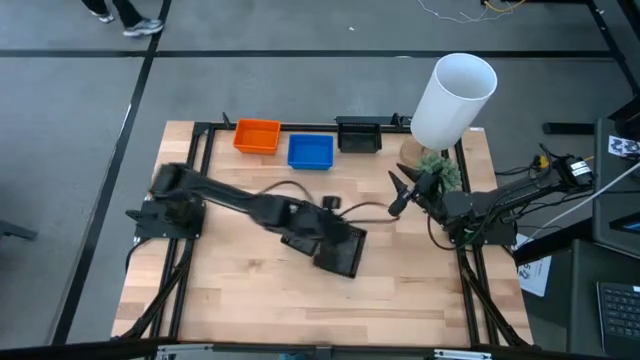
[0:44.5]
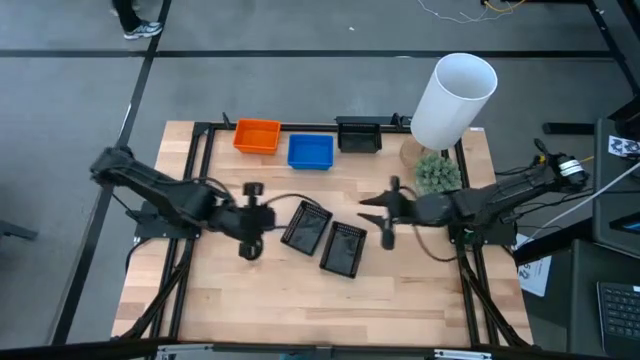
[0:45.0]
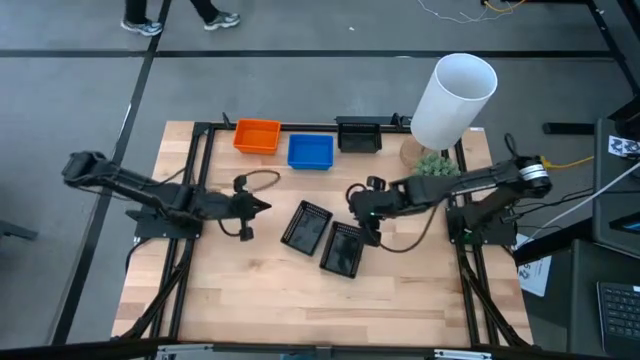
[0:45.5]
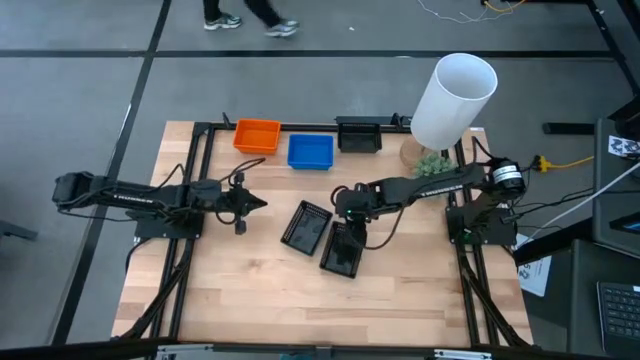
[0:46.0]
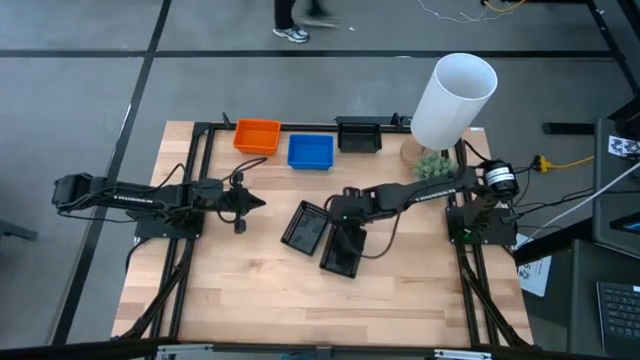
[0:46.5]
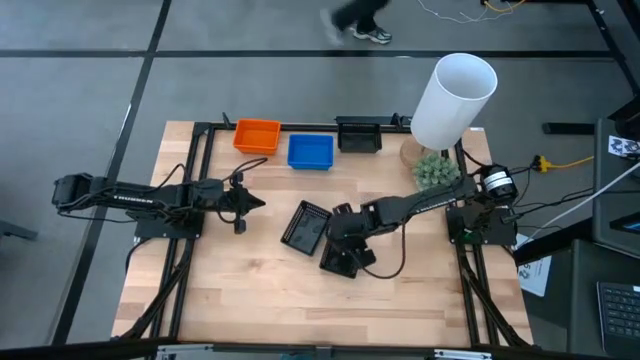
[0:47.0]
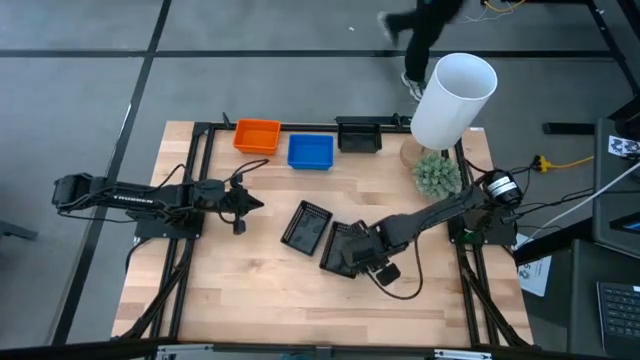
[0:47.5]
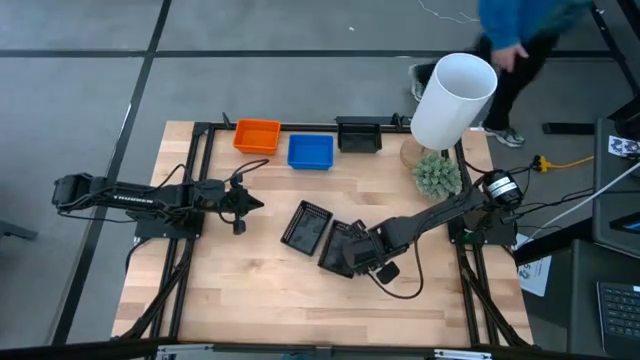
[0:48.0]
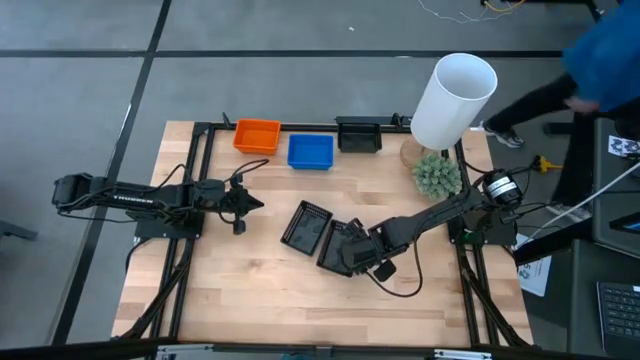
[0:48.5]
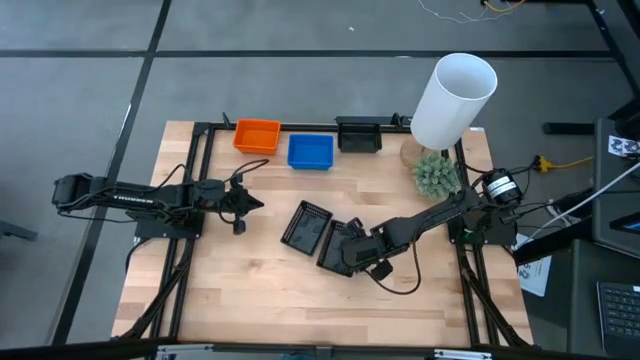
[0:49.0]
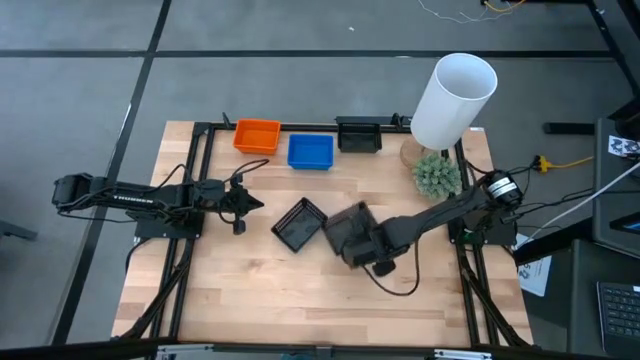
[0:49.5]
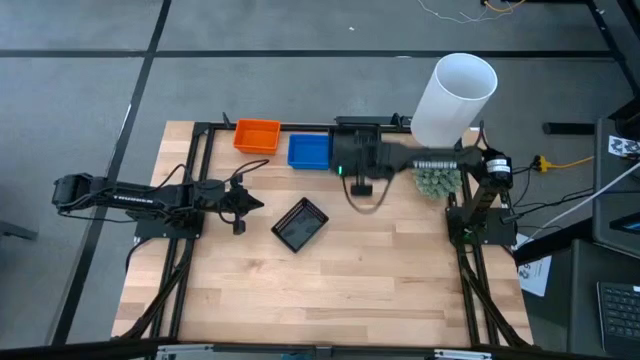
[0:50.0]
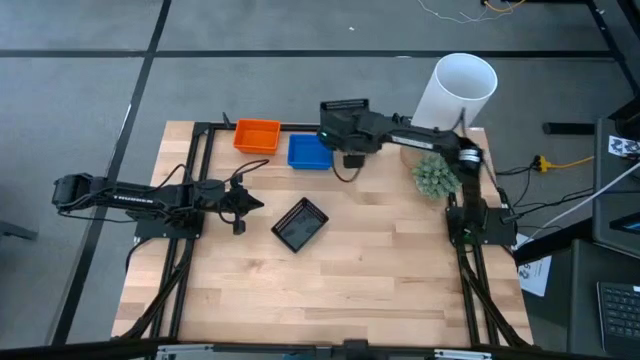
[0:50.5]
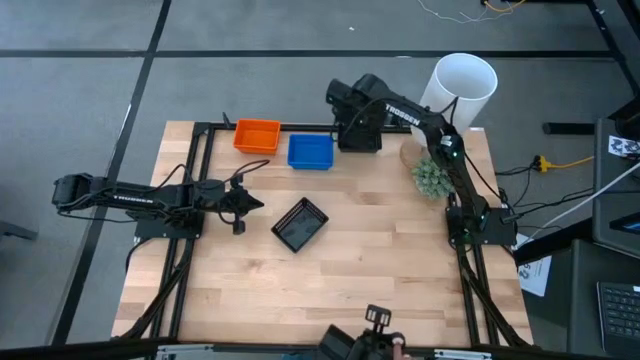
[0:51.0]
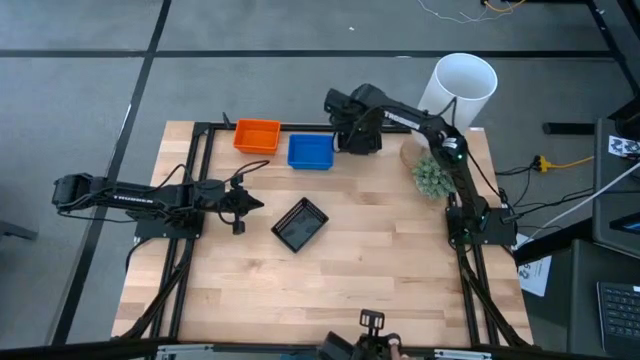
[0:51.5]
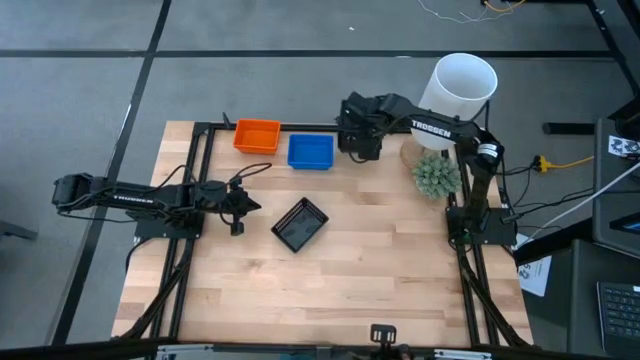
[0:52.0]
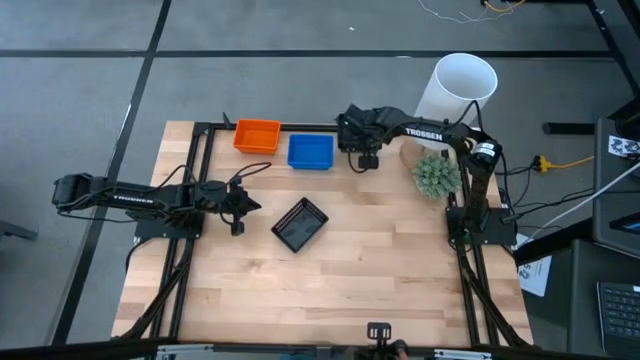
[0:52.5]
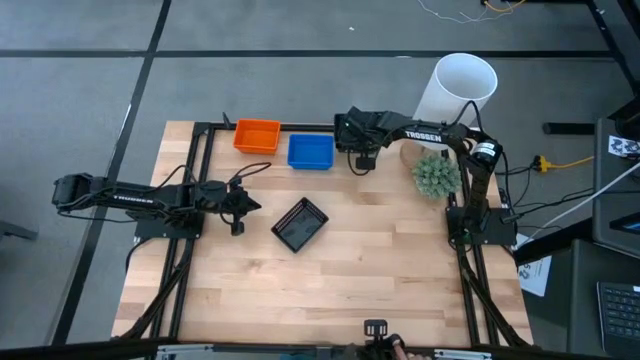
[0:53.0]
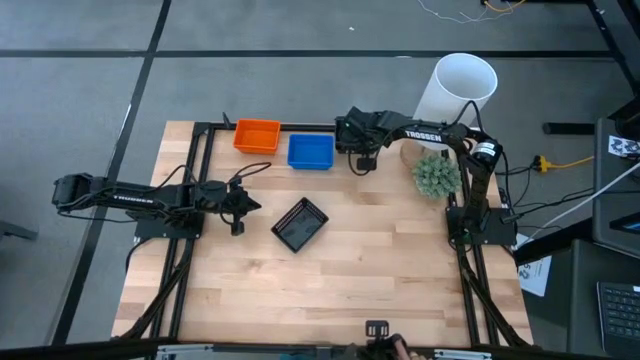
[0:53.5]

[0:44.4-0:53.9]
Stack the bottom right black bin on the top black bin

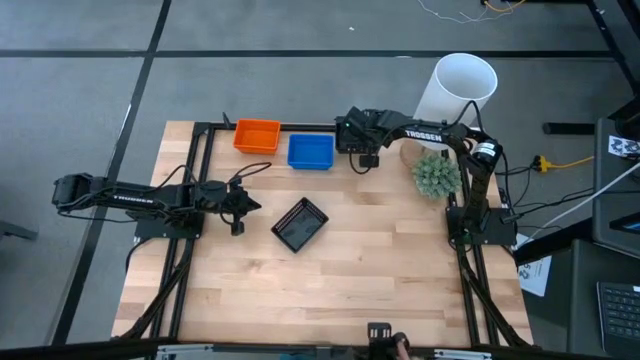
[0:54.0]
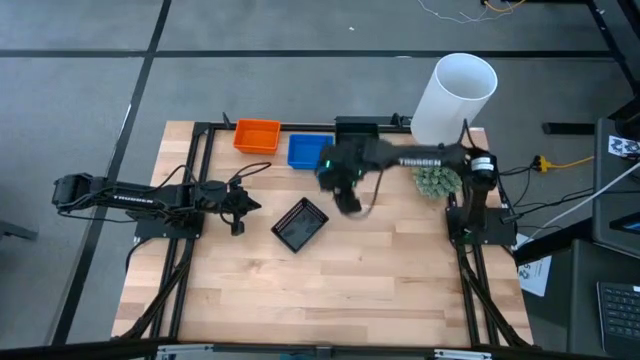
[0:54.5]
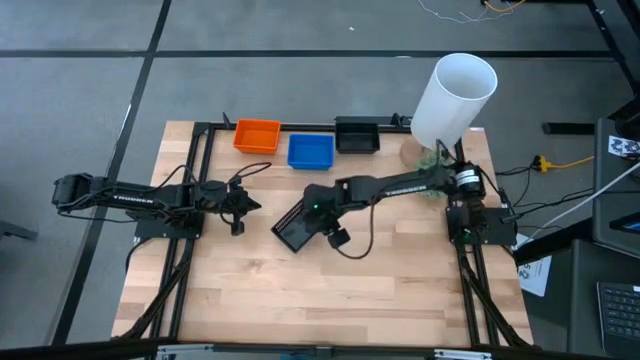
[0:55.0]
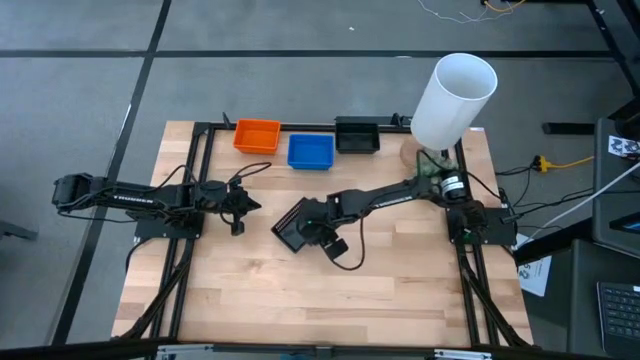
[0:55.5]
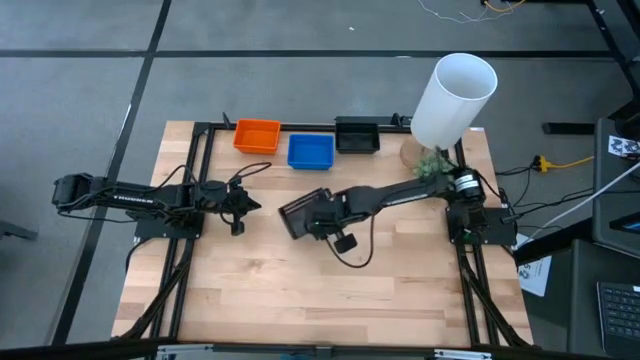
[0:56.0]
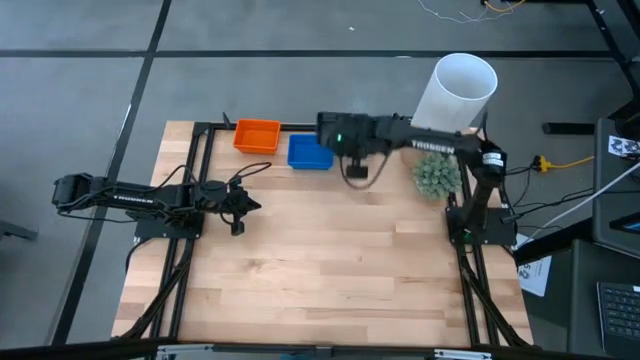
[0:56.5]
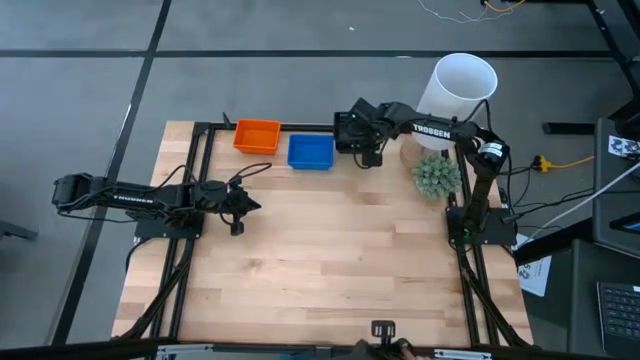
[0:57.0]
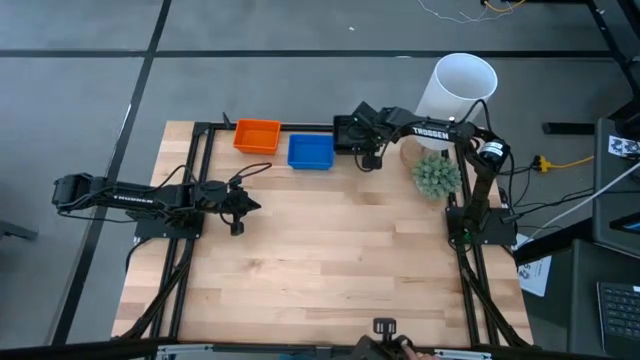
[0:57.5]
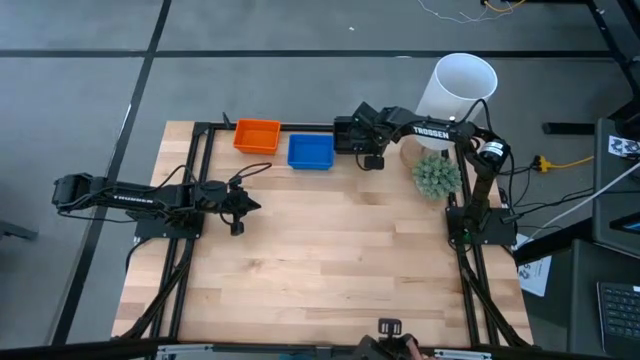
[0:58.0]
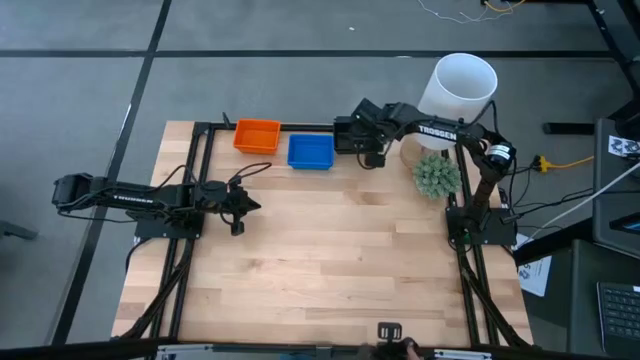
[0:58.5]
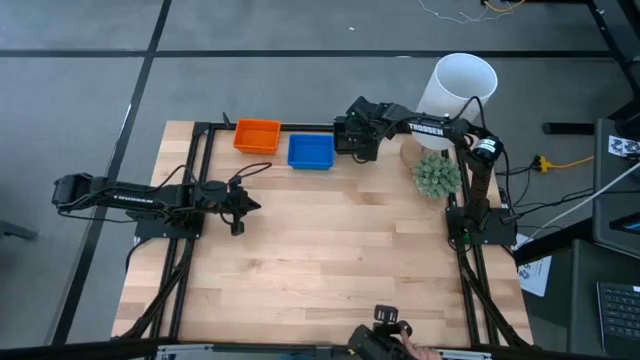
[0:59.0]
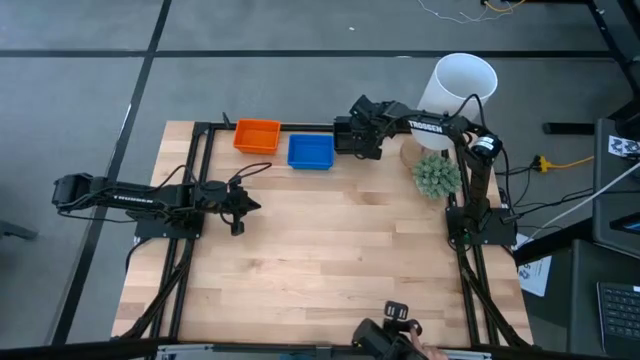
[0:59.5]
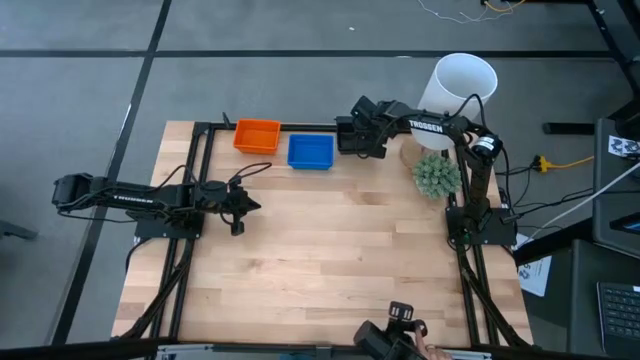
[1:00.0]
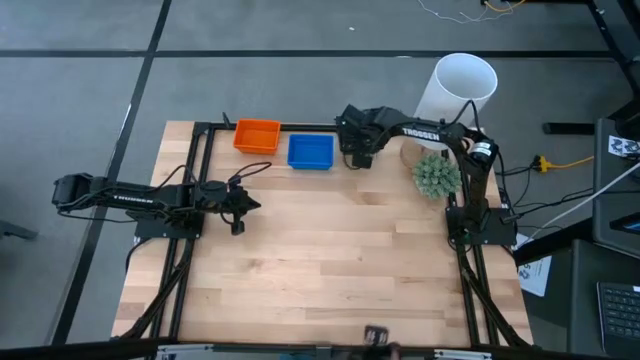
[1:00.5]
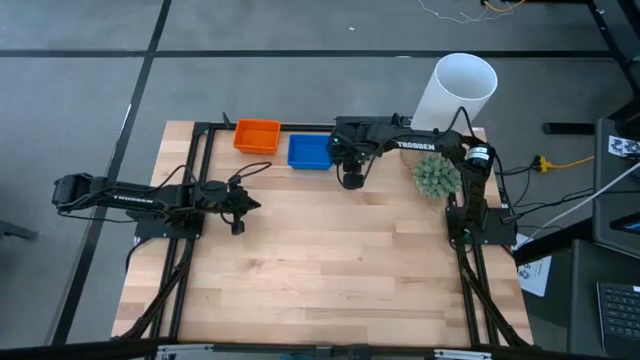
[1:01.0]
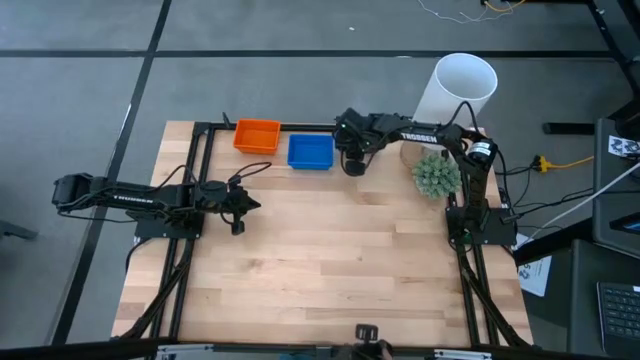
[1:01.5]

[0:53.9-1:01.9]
Stack the bottom black bin on the top black bin

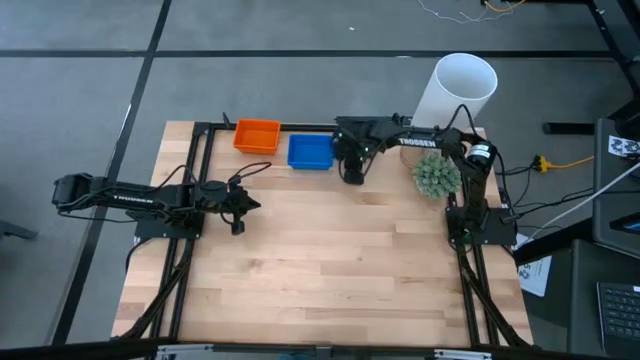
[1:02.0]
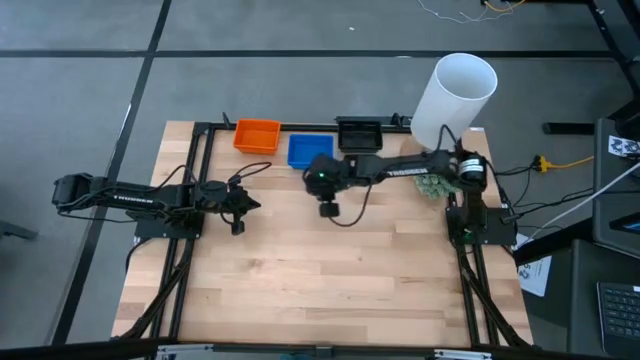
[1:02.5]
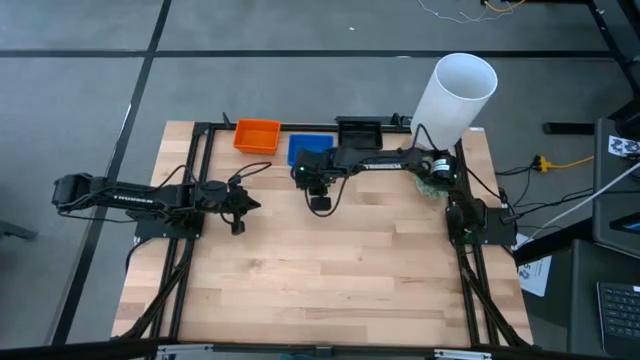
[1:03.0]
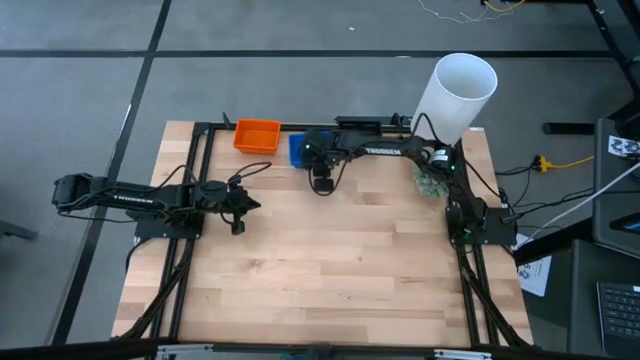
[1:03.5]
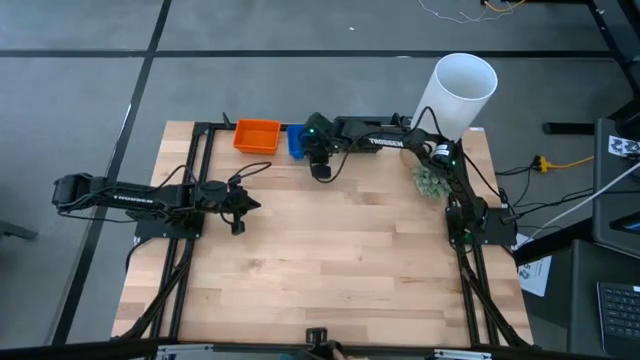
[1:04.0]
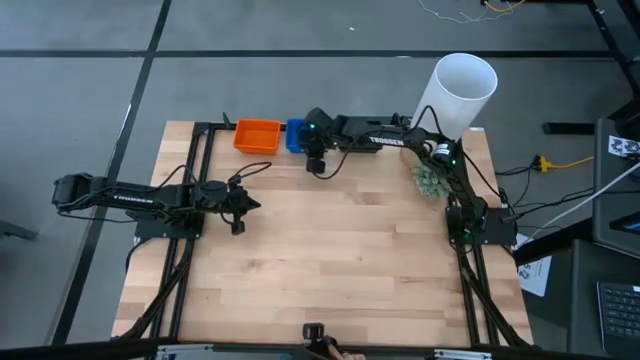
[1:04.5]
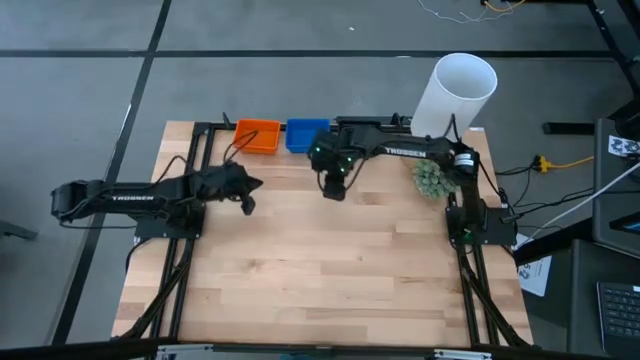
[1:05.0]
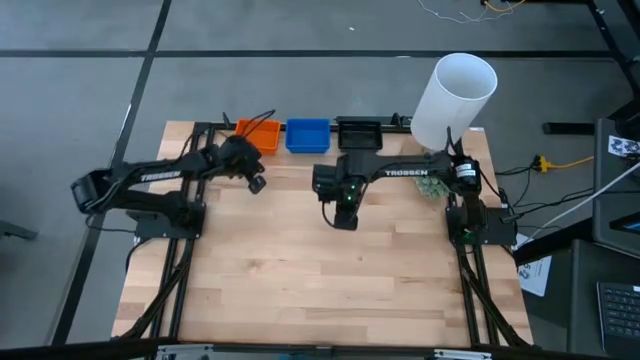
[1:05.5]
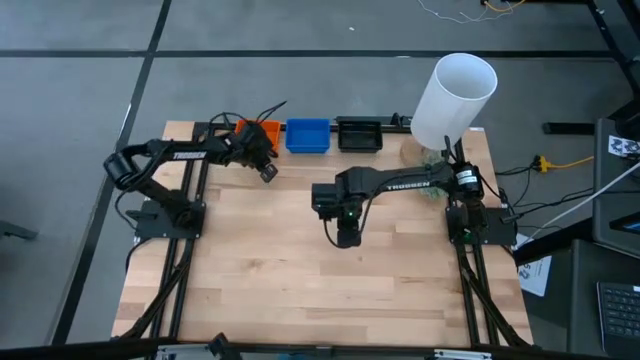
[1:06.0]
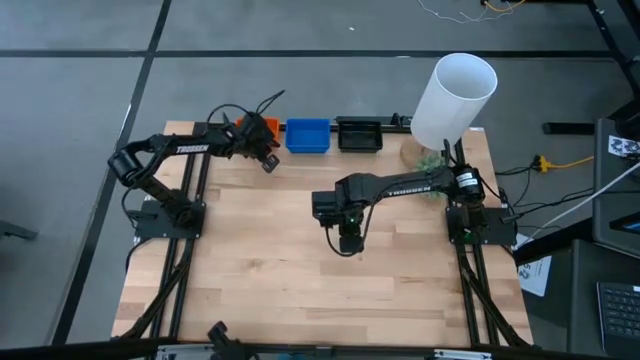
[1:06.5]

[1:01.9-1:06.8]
Adjust the bins
